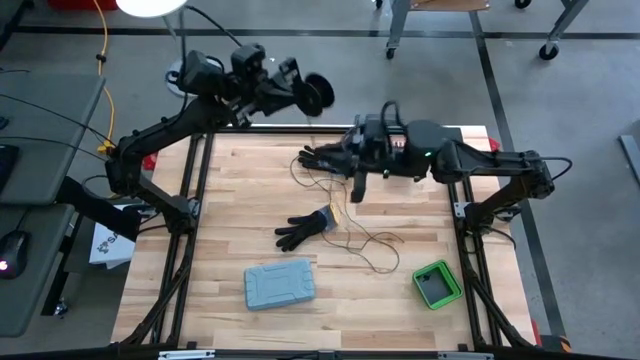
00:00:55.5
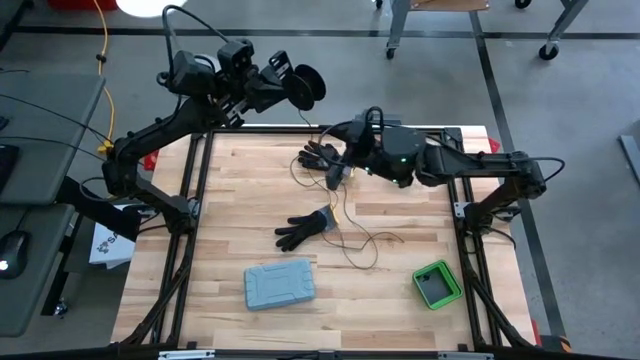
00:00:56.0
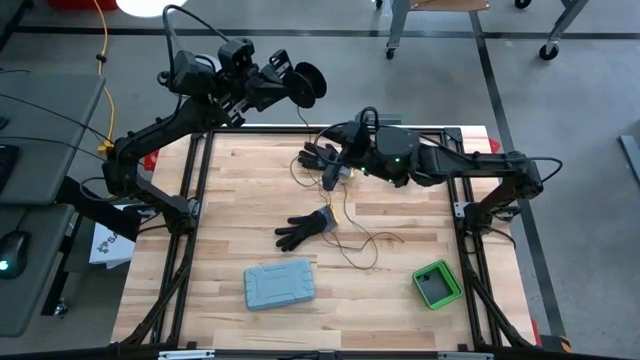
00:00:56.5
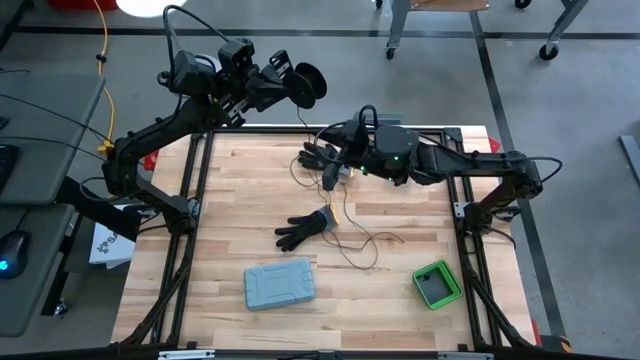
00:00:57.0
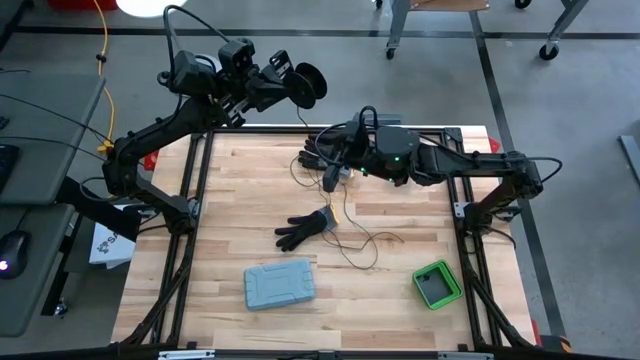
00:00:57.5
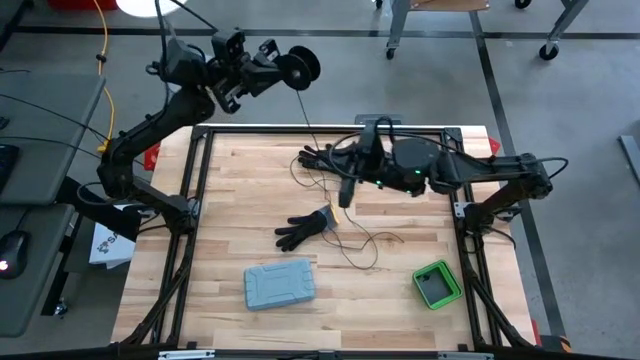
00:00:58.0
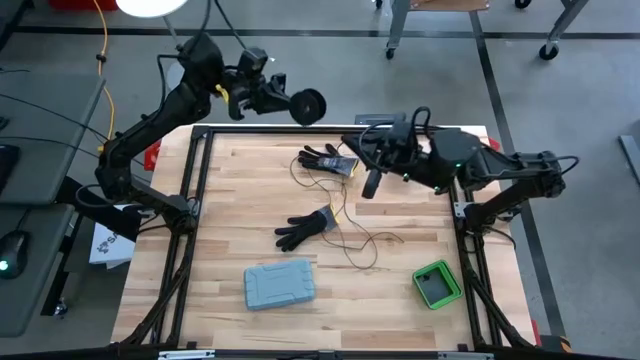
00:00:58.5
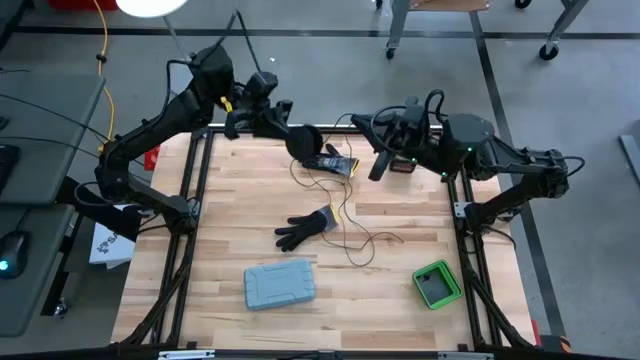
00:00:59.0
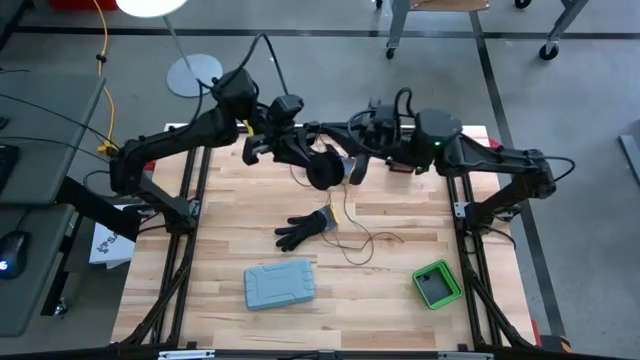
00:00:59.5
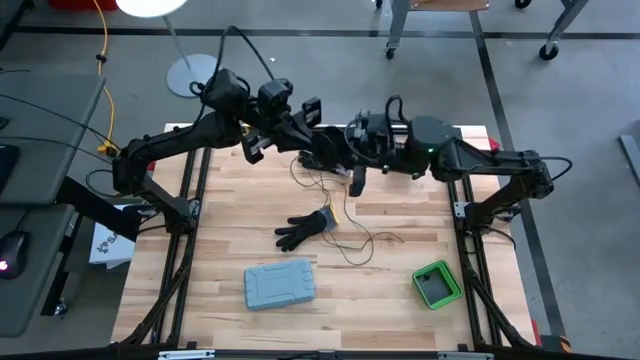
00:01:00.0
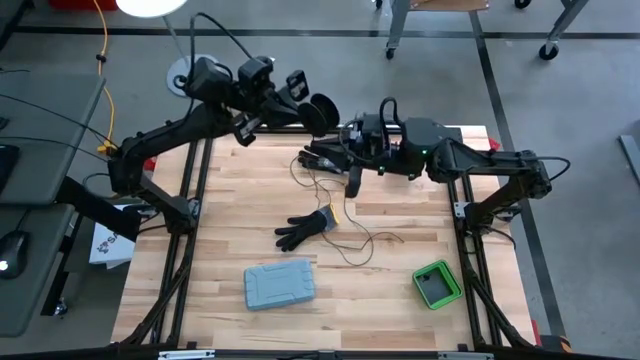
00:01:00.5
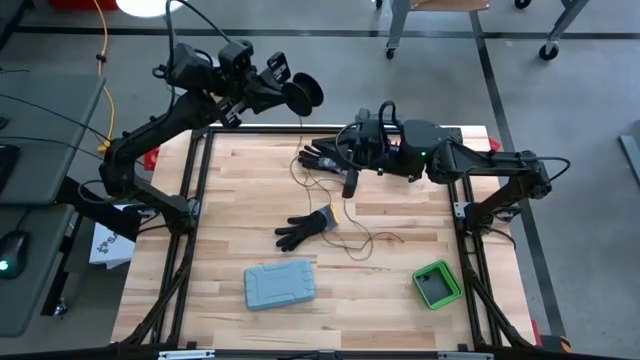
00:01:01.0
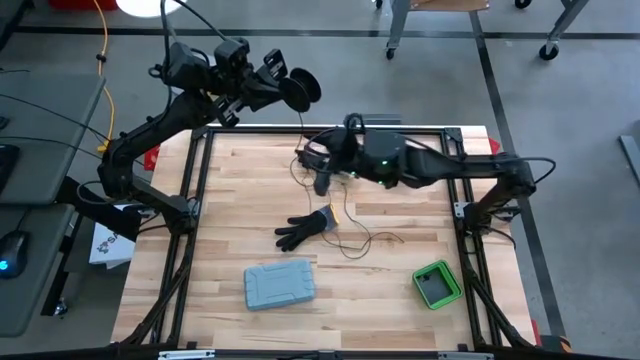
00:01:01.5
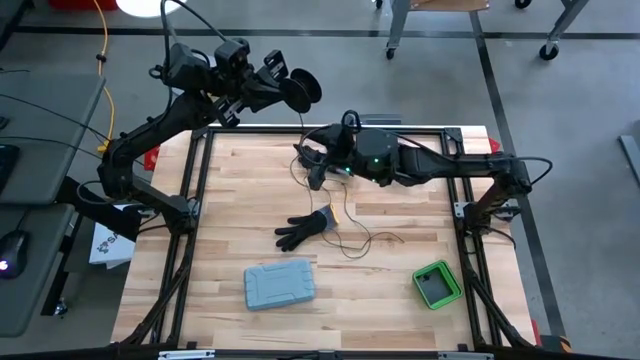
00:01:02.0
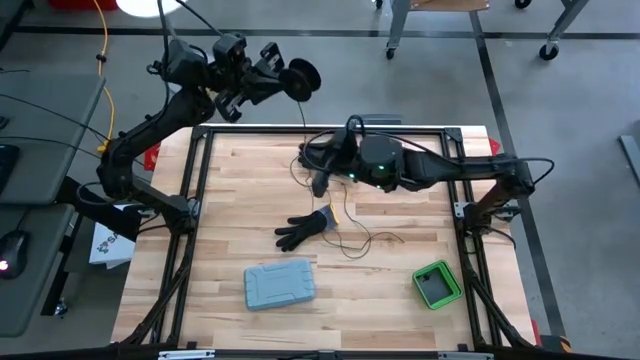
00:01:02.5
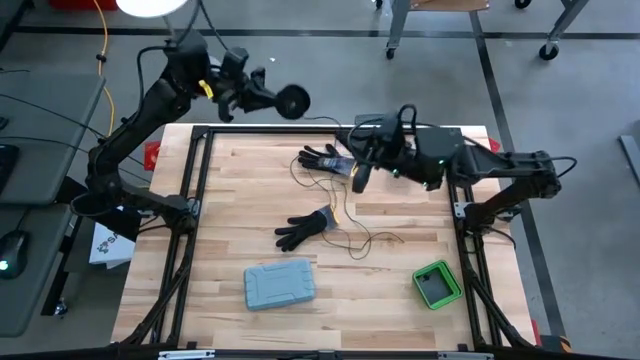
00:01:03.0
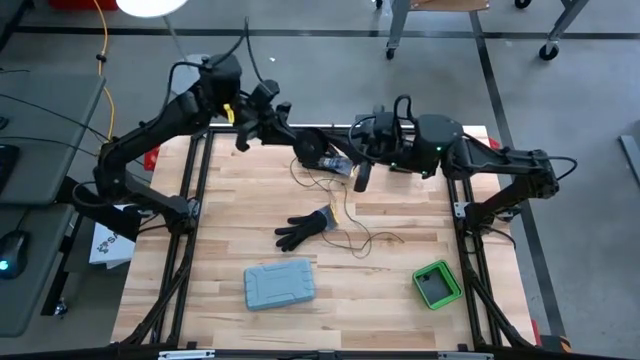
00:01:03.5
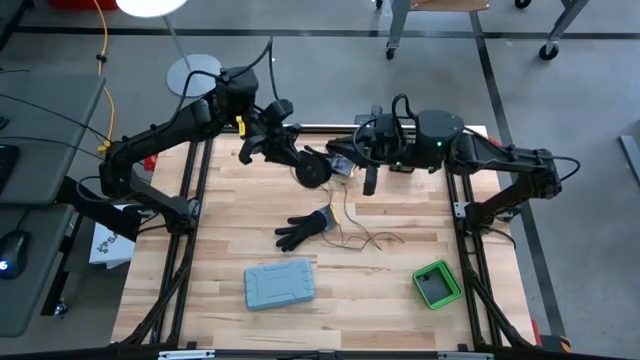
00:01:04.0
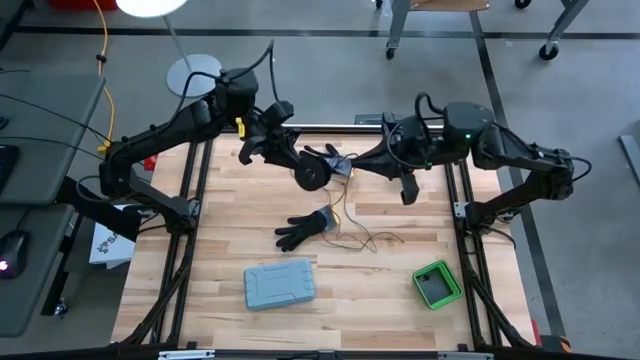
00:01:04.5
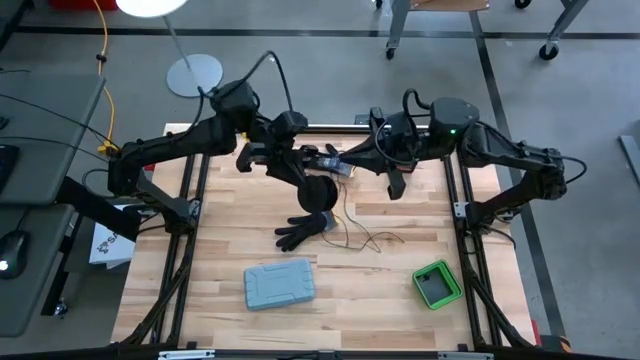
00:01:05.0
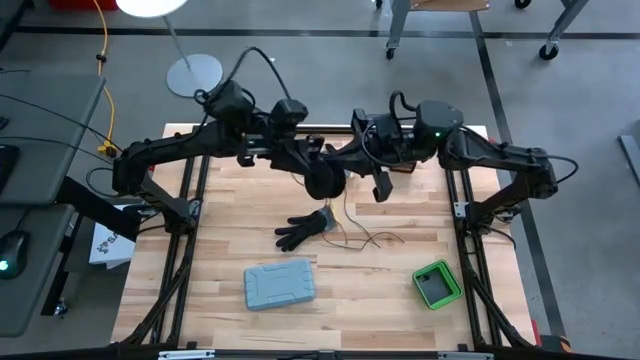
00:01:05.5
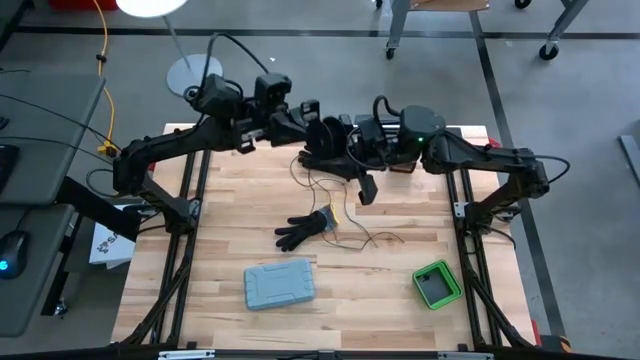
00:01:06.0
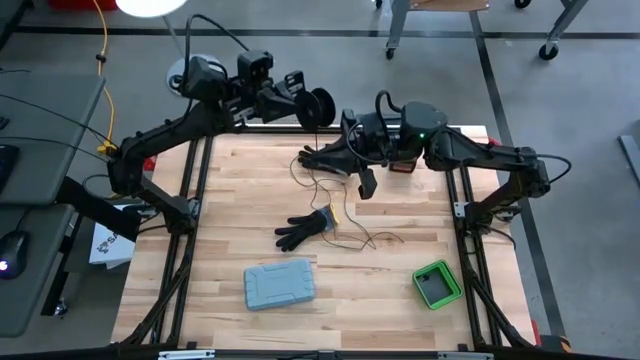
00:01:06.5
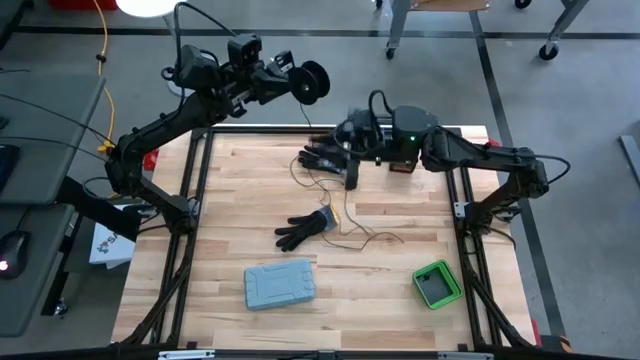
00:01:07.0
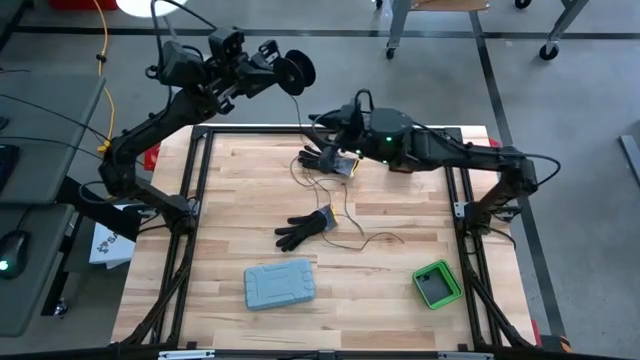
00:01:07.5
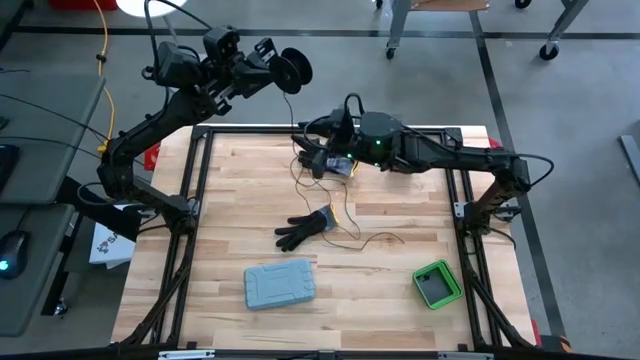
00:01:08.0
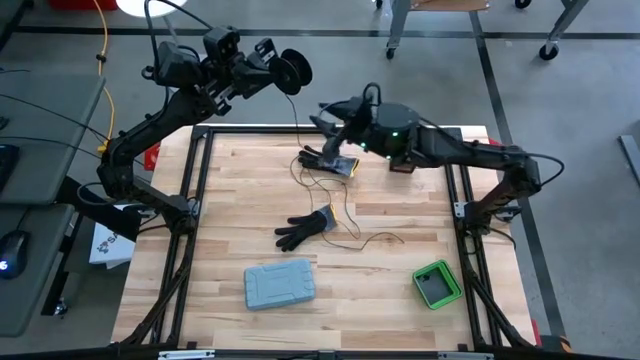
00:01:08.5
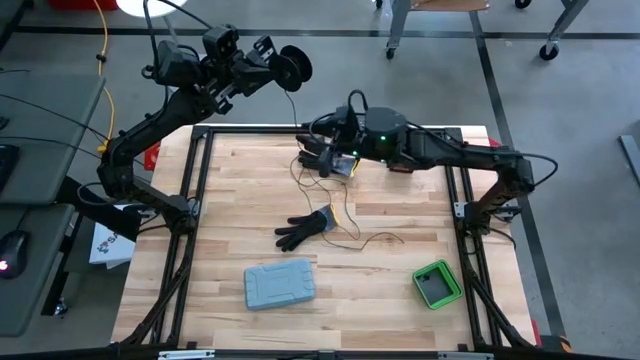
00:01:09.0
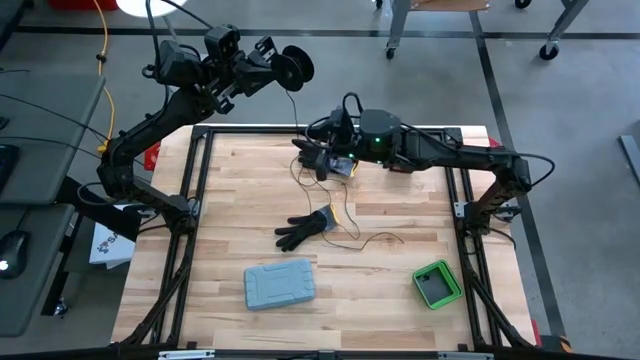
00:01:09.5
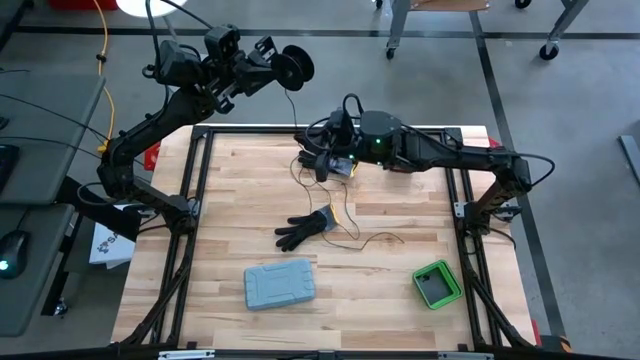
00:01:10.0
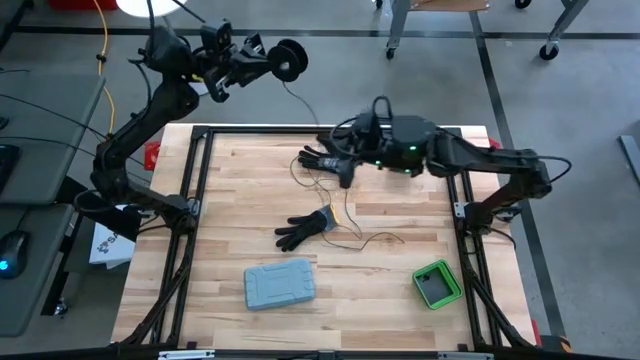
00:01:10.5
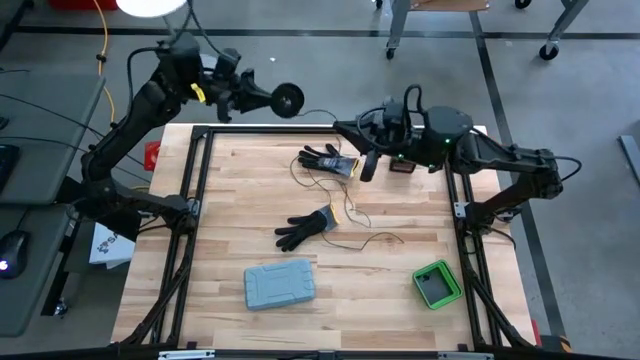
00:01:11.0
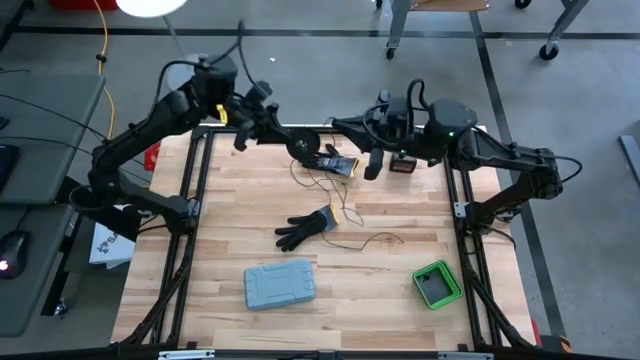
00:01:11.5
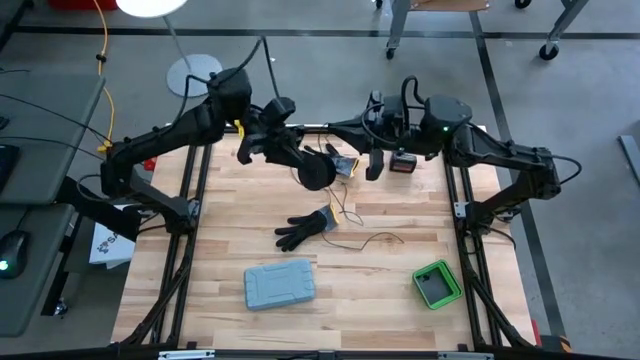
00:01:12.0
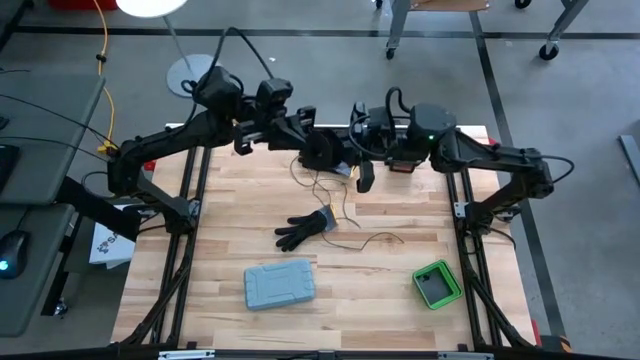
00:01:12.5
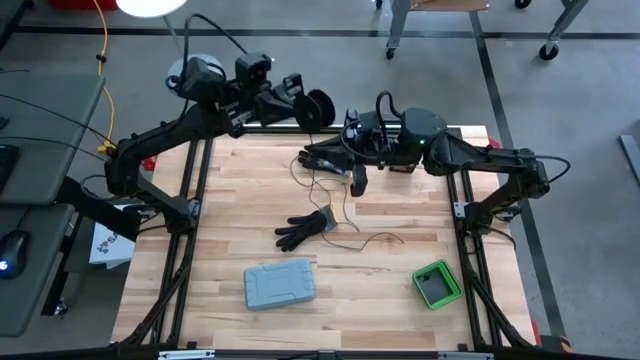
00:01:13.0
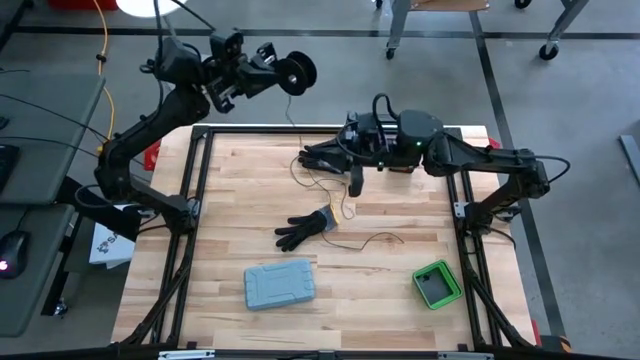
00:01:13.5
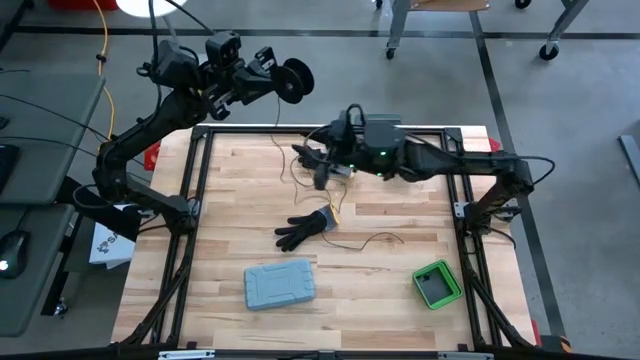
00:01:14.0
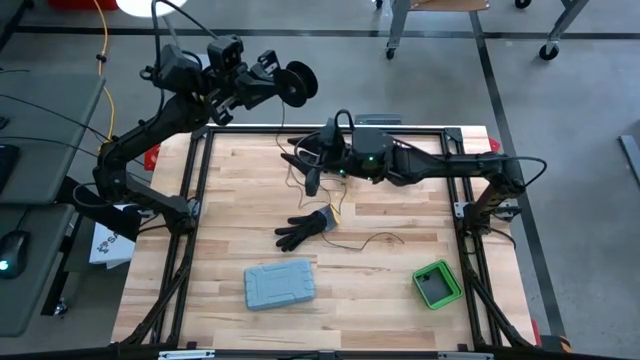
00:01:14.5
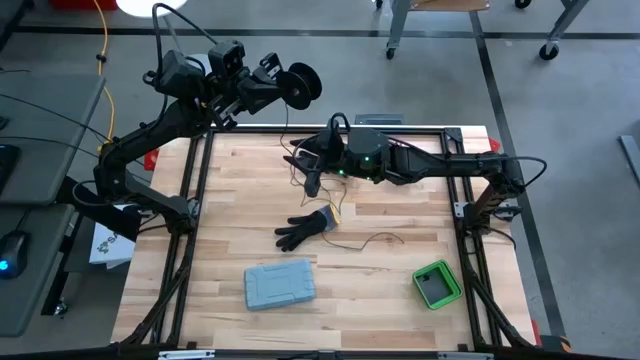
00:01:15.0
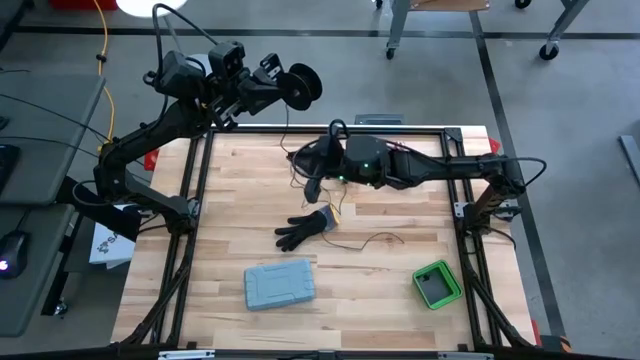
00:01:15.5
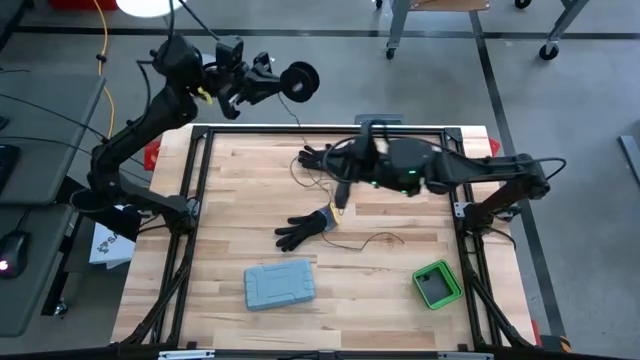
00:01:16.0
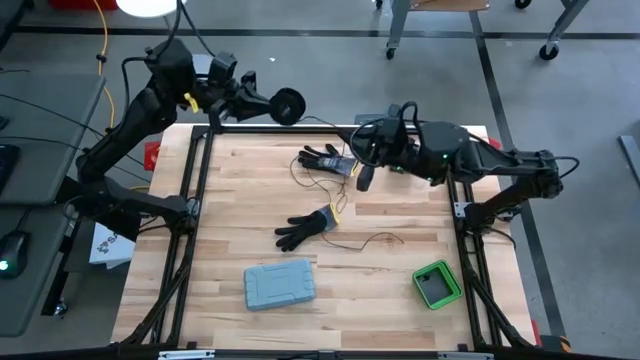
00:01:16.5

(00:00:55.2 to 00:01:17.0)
Task: Coil cords
Coil the black wire cable onto the black spool

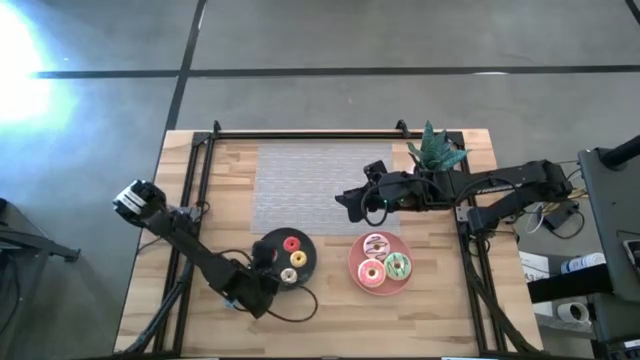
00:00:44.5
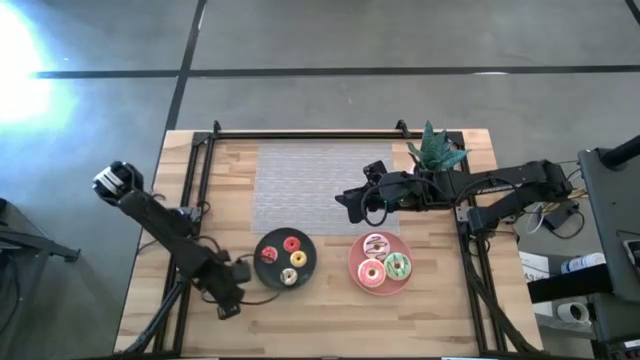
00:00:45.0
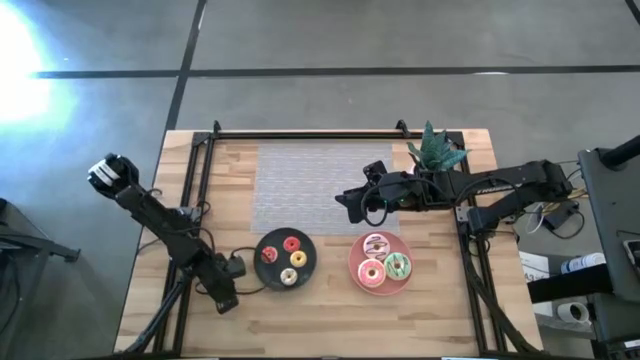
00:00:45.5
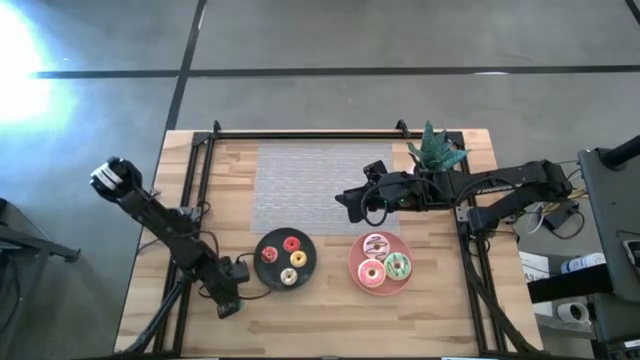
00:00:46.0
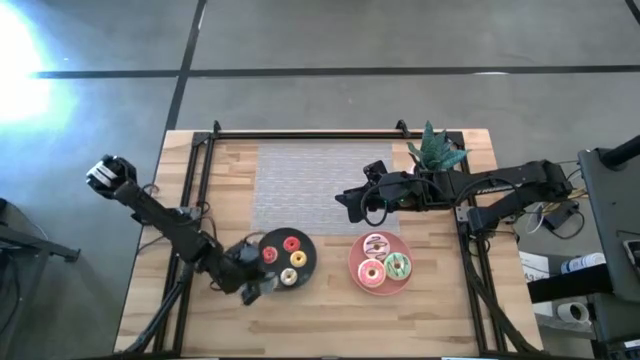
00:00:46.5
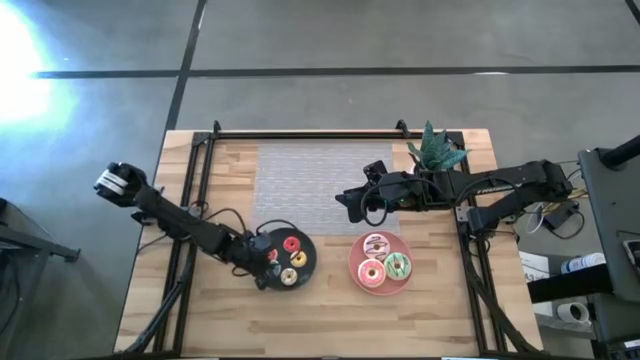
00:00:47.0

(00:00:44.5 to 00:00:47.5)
Task: Pick & Place donuts
Put the small blue donut on the black plate
